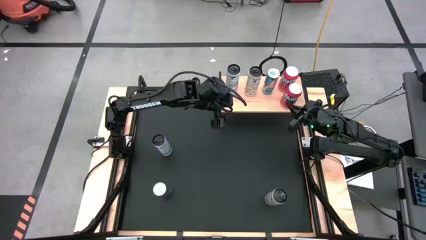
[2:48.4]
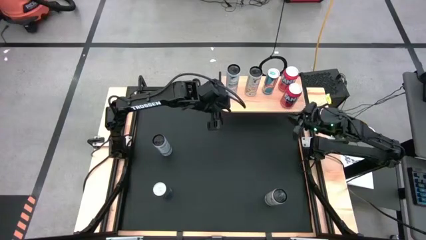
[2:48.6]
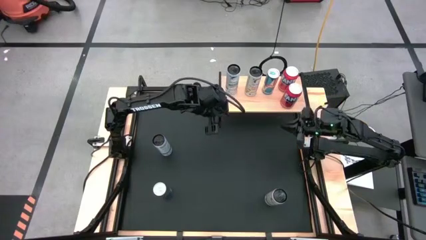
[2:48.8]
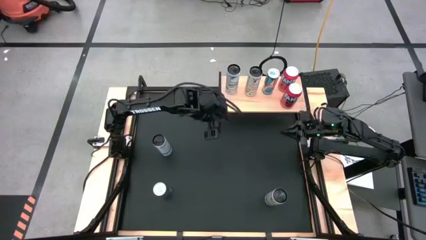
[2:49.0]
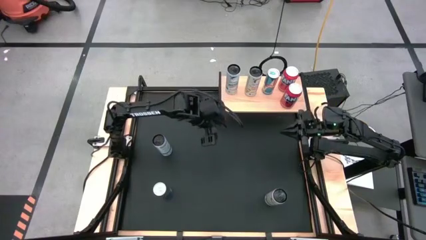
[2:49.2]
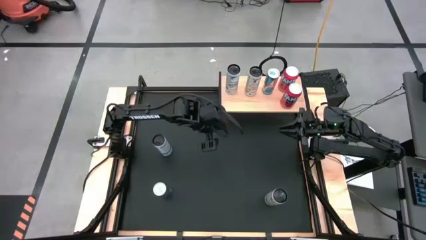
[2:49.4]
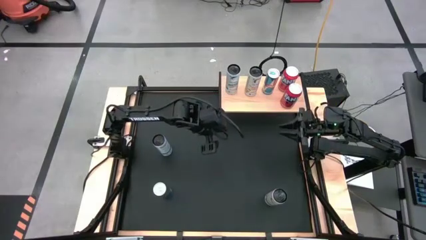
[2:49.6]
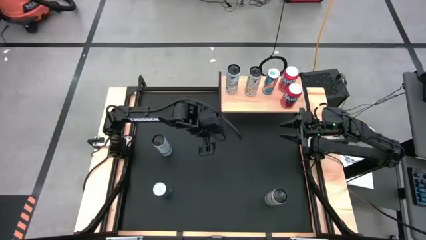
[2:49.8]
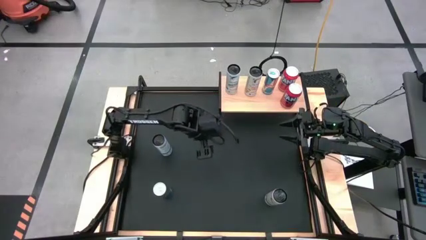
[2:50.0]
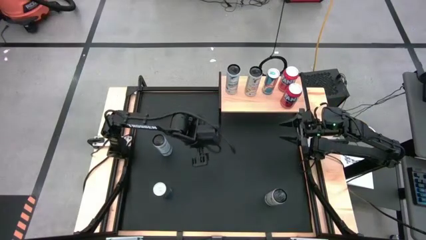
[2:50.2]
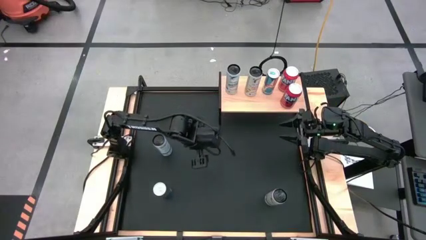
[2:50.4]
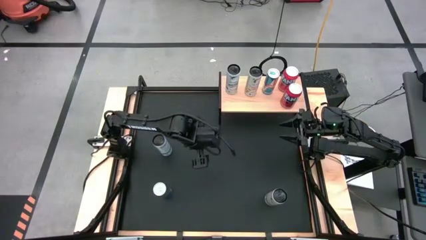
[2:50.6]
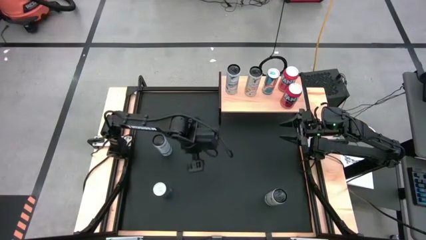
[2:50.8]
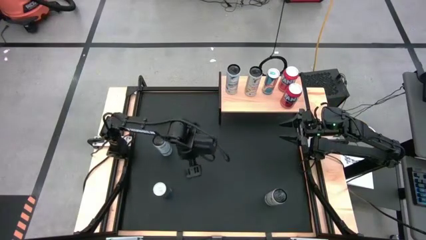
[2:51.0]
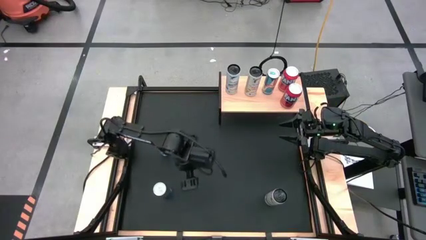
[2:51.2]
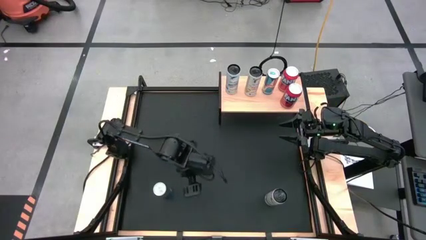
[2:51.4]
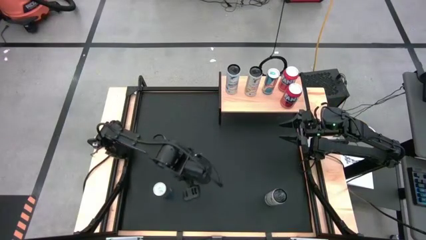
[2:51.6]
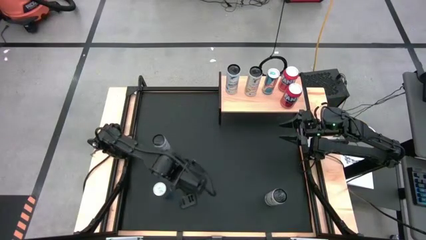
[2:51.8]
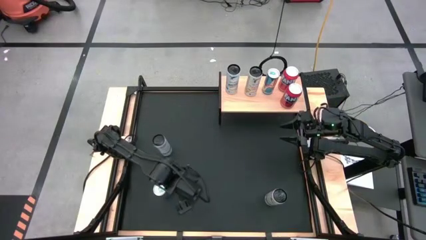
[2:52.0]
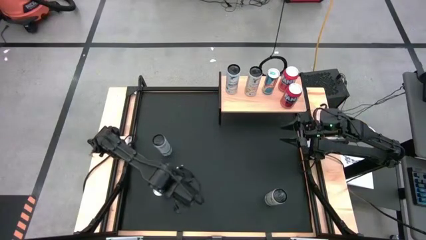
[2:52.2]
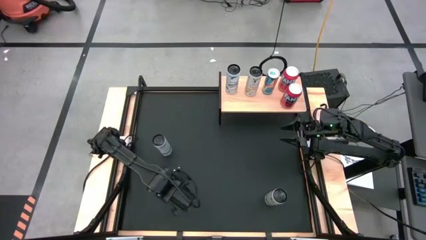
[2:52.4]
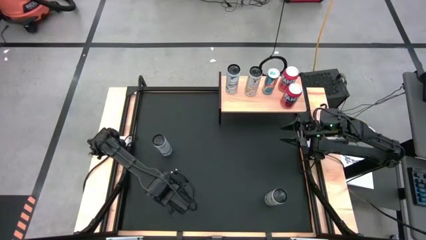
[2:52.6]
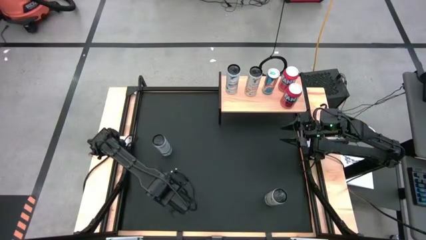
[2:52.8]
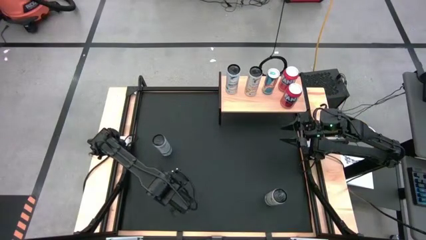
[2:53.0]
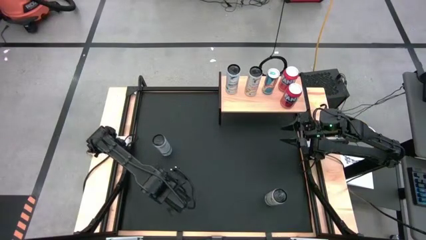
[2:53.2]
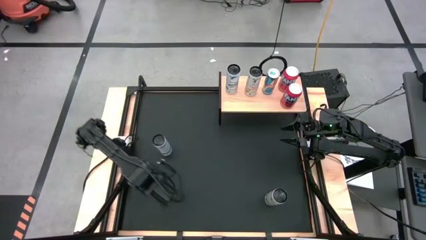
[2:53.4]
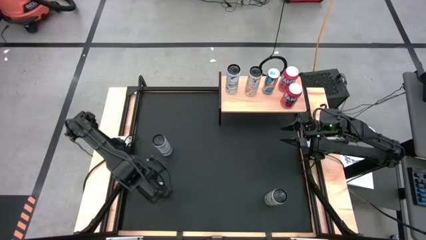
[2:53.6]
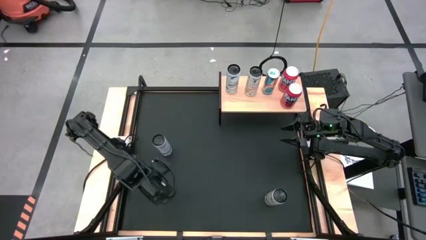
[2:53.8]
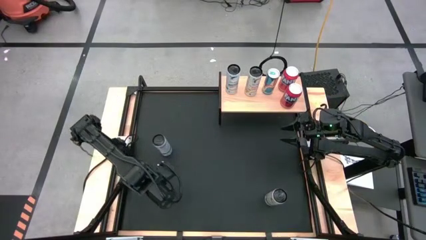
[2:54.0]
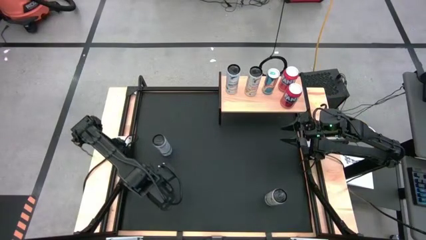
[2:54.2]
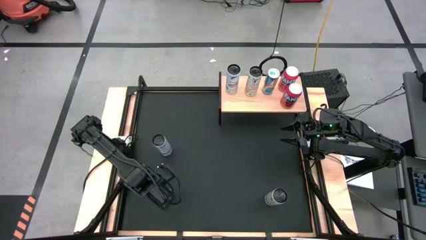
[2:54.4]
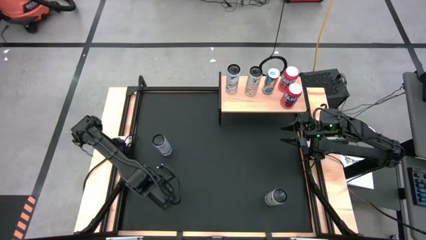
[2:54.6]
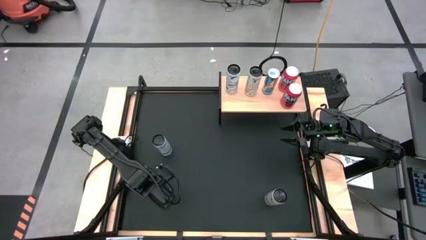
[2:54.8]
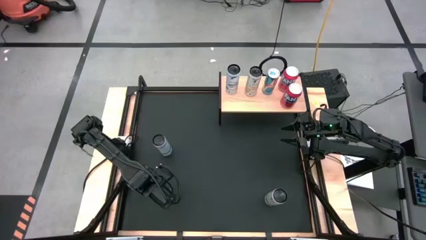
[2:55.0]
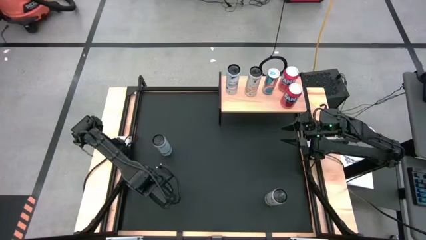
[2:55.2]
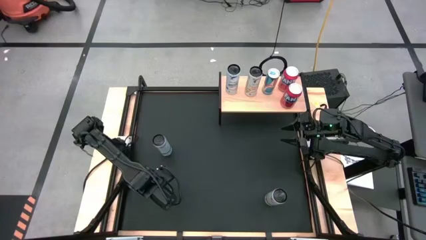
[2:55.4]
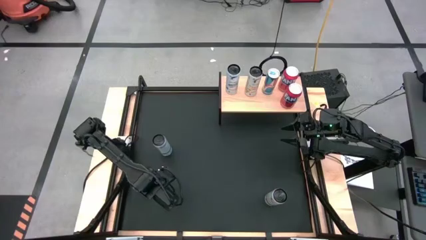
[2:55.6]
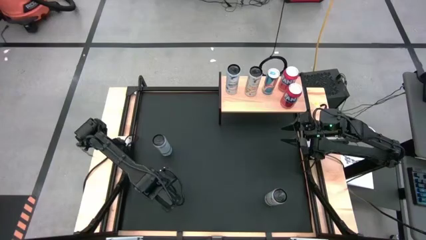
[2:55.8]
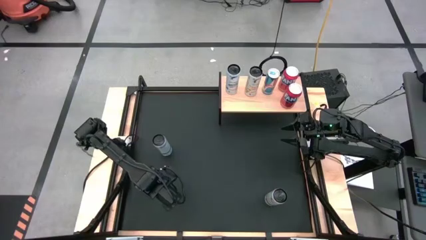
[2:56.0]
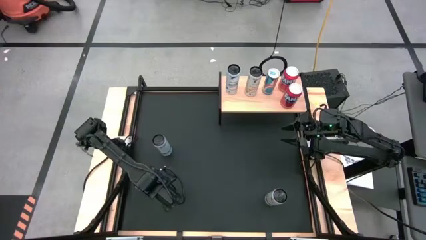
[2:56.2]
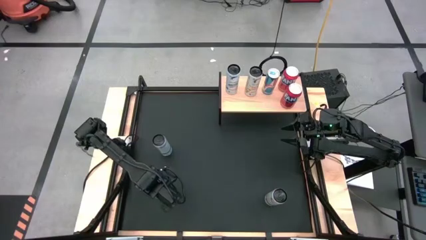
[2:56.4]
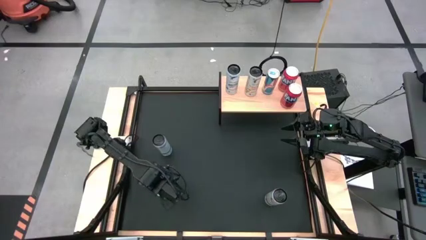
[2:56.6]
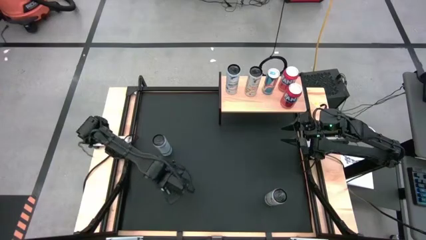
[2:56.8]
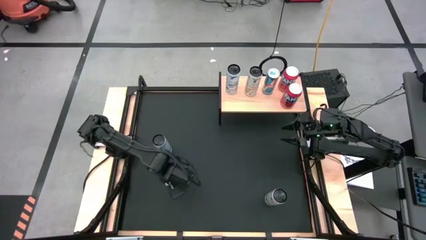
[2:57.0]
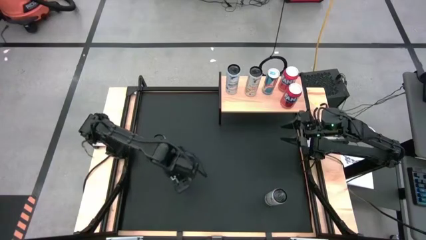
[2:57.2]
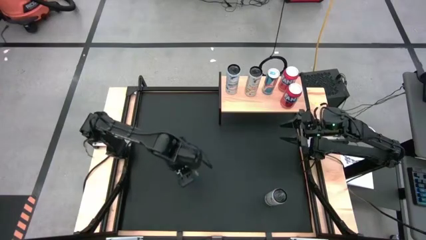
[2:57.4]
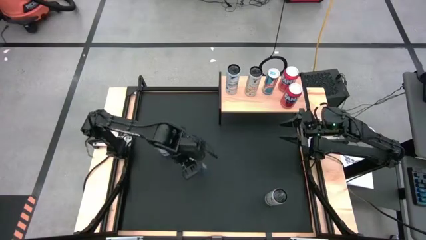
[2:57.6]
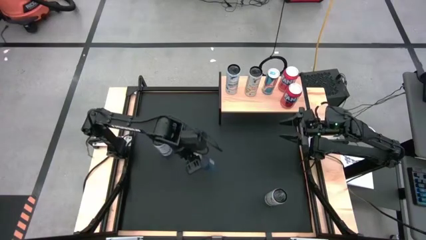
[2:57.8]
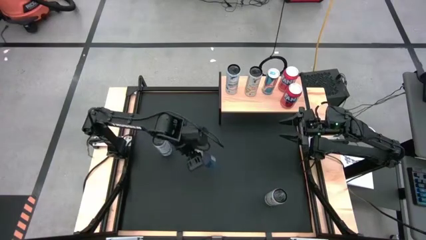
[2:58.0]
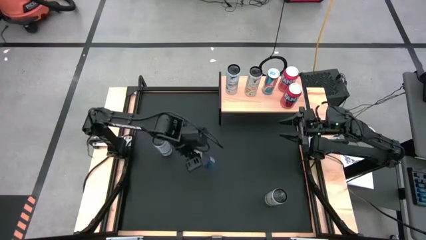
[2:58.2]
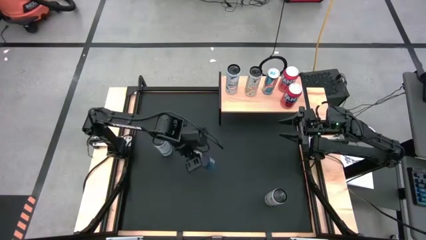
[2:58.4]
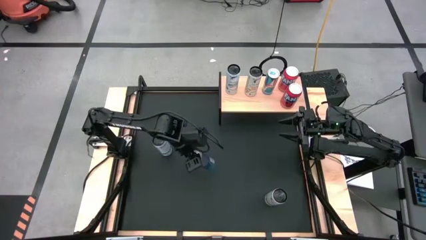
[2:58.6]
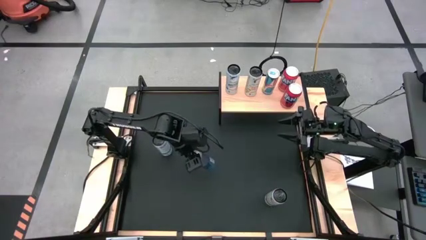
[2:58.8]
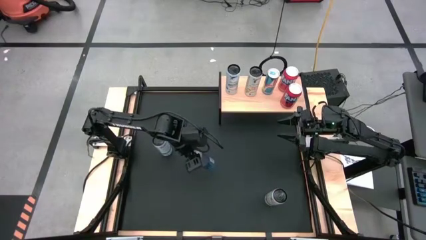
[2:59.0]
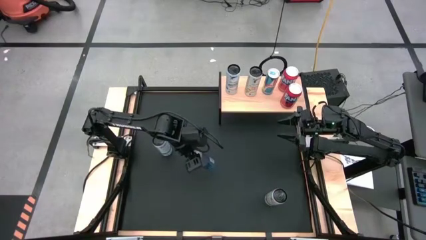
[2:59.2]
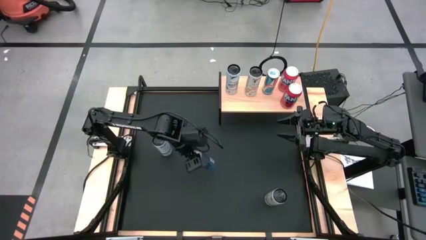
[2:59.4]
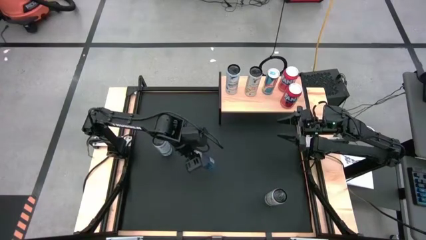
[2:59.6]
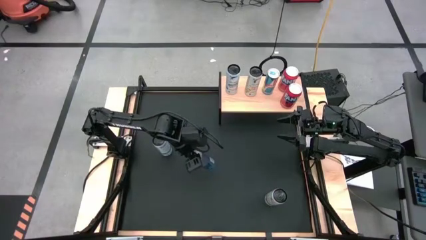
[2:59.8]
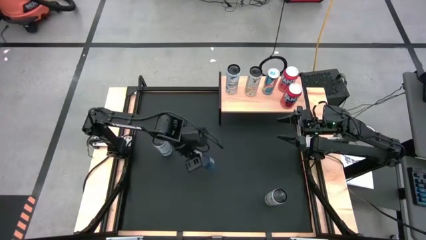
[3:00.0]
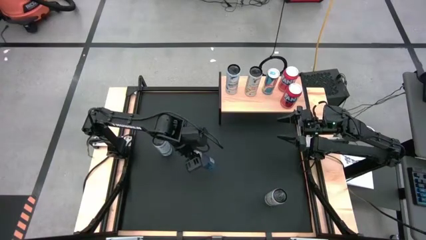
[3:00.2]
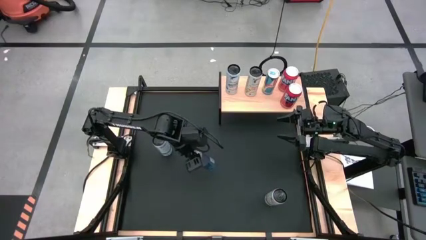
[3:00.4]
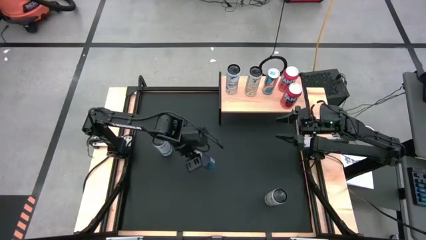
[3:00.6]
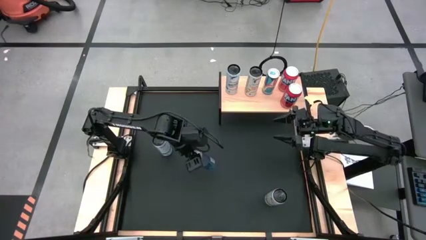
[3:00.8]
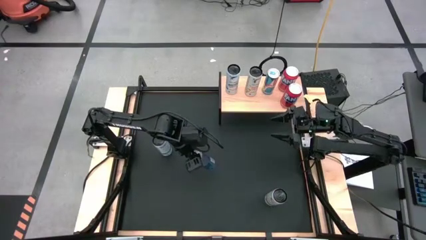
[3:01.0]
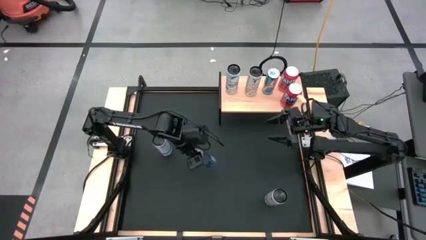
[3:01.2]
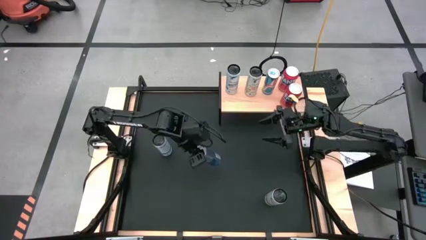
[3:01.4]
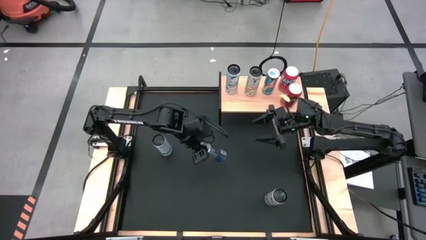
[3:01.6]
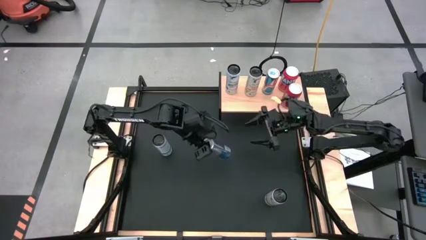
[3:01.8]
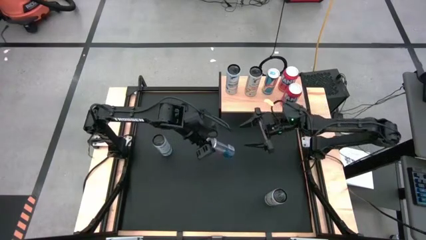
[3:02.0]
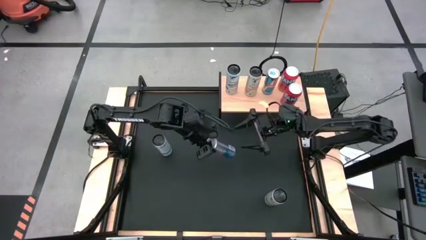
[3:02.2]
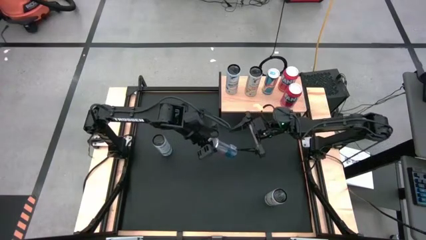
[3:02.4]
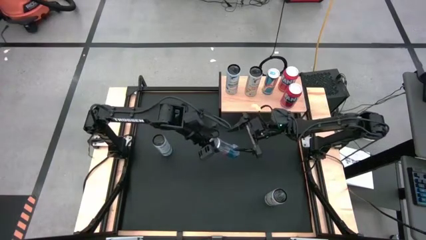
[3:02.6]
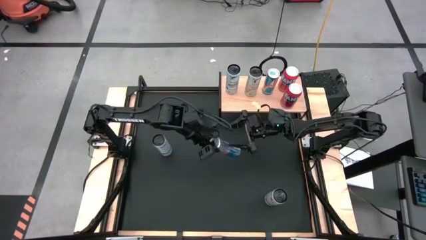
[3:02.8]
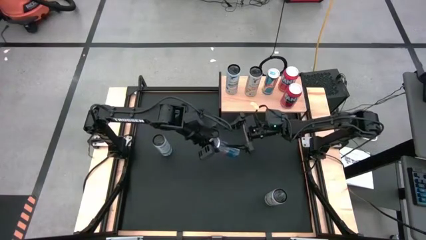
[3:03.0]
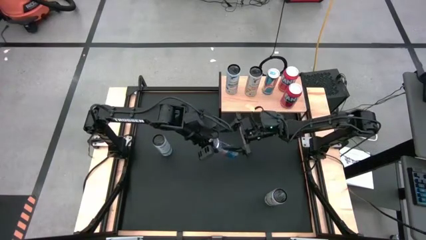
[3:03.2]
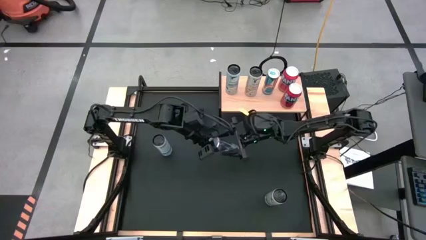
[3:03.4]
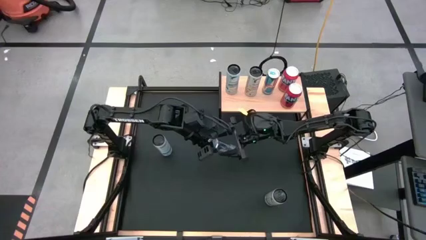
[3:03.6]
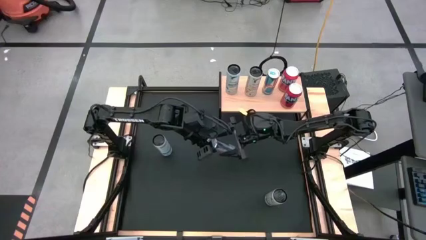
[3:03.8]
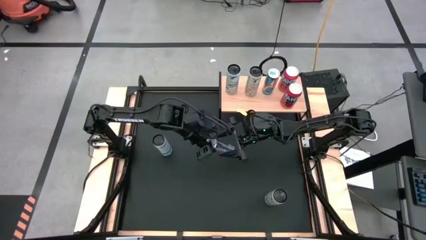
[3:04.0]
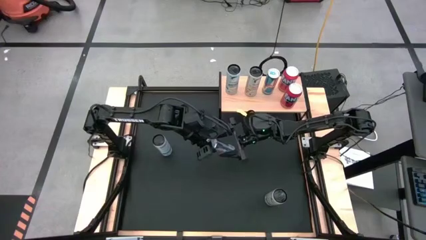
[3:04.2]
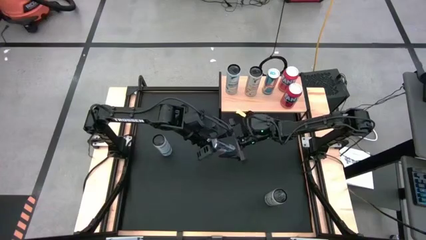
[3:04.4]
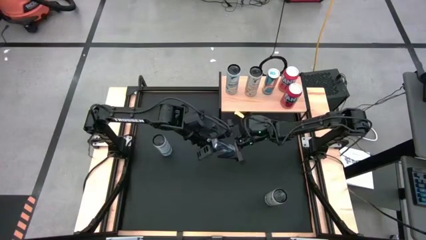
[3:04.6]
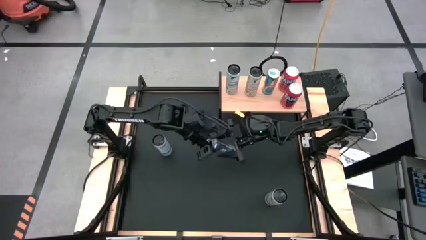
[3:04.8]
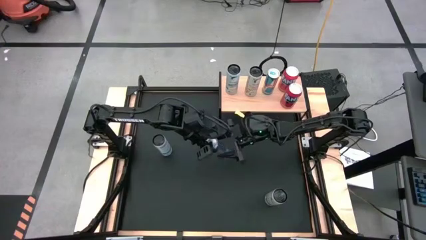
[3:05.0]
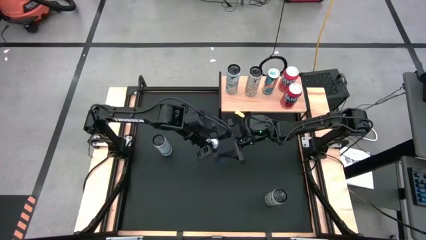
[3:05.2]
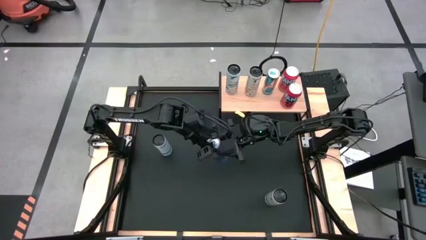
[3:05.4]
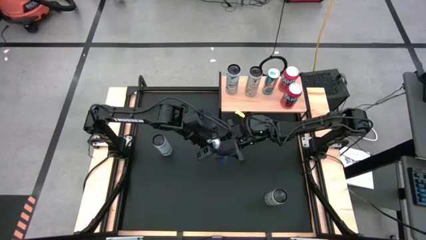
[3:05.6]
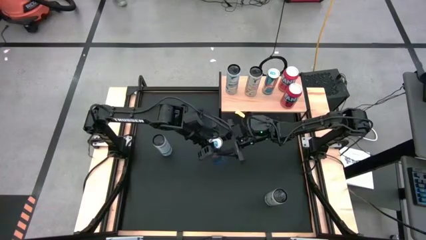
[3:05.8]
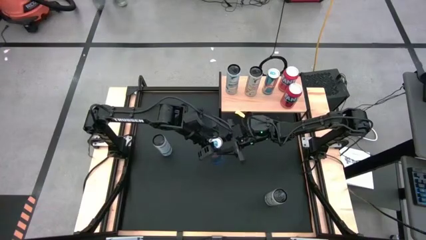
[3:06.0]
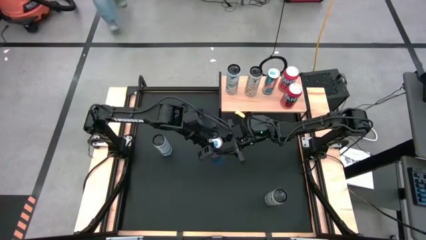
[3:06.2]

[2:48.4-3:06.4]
Task: Place canned beverage on shelf
Put the blue soda can on the shelf aligned with the blue soda can
